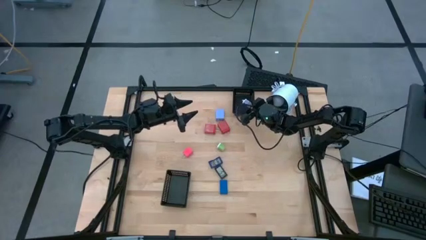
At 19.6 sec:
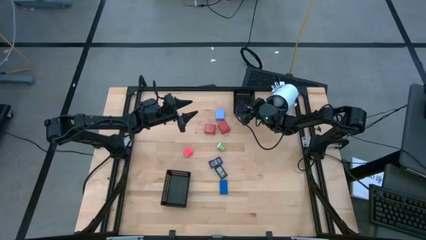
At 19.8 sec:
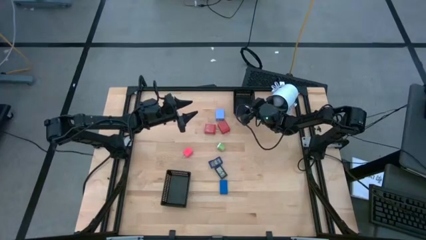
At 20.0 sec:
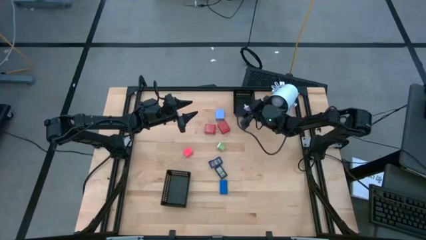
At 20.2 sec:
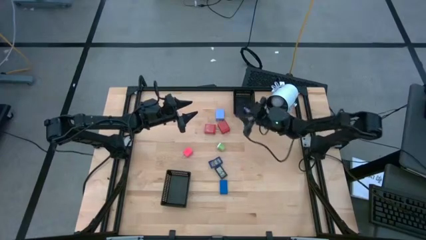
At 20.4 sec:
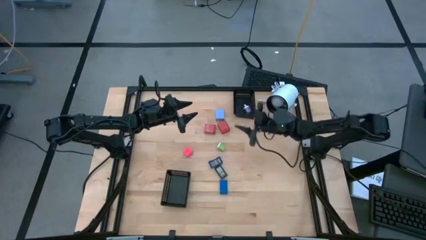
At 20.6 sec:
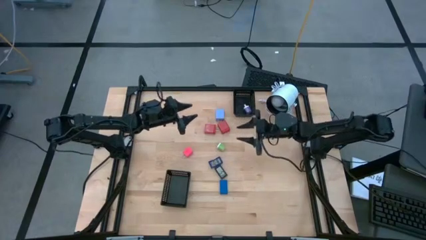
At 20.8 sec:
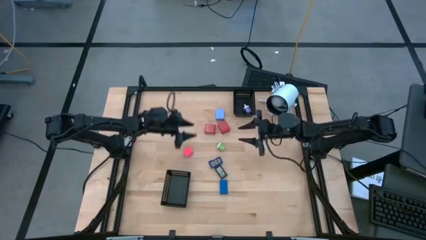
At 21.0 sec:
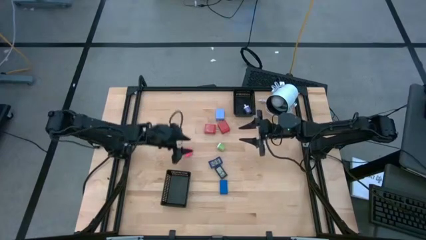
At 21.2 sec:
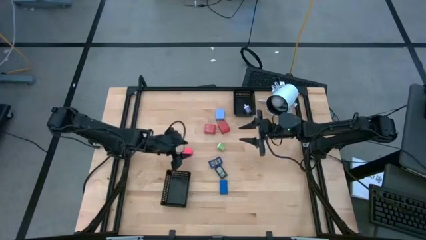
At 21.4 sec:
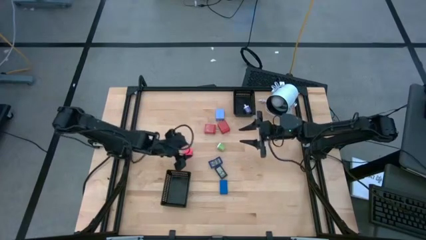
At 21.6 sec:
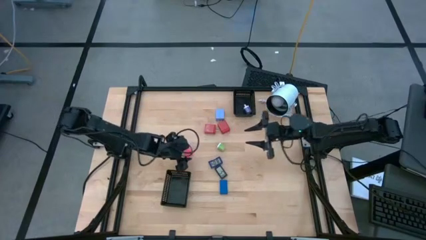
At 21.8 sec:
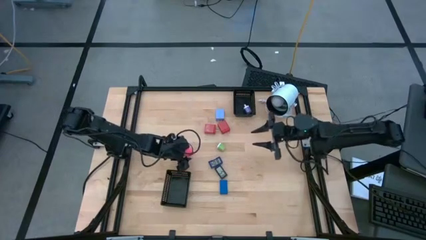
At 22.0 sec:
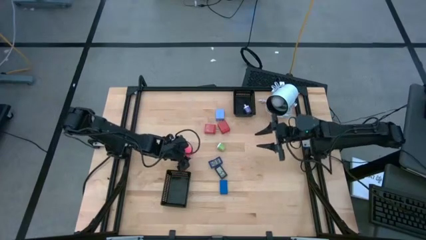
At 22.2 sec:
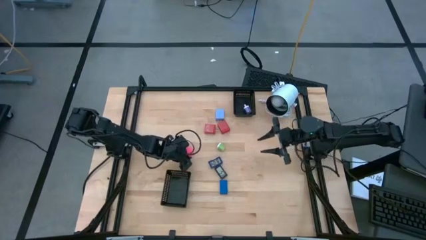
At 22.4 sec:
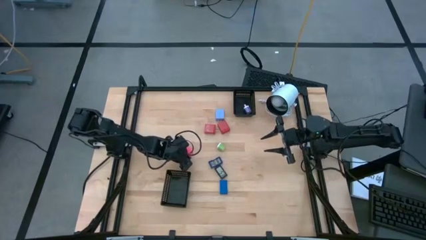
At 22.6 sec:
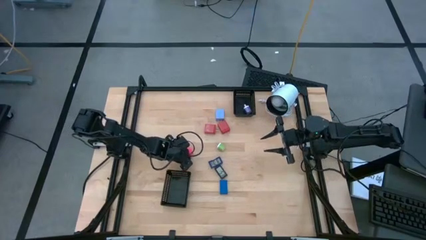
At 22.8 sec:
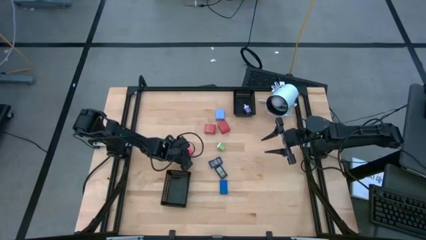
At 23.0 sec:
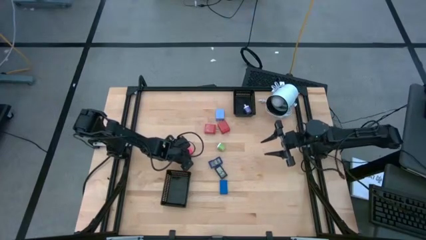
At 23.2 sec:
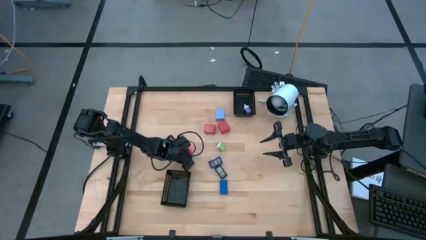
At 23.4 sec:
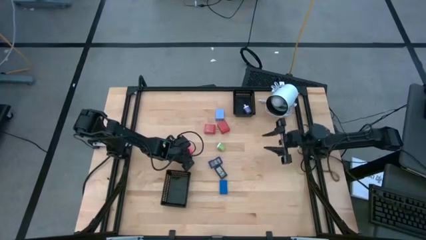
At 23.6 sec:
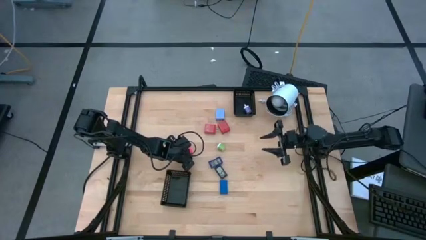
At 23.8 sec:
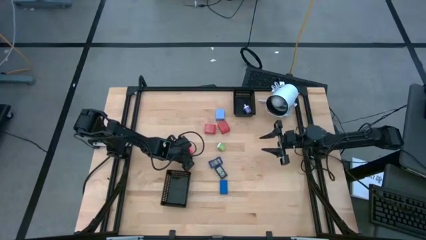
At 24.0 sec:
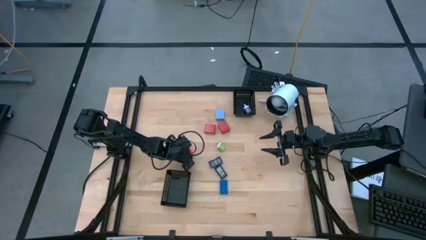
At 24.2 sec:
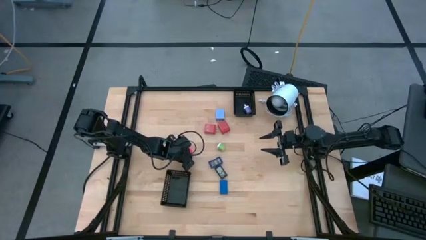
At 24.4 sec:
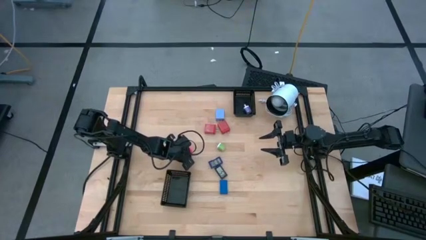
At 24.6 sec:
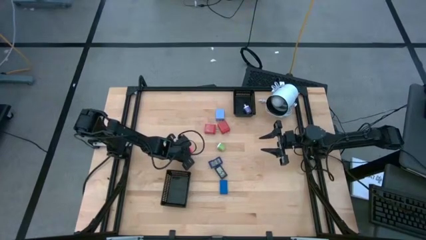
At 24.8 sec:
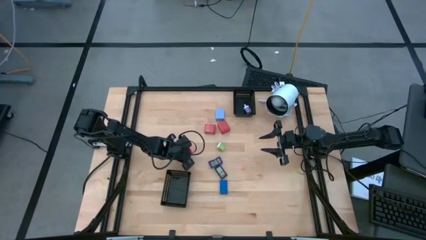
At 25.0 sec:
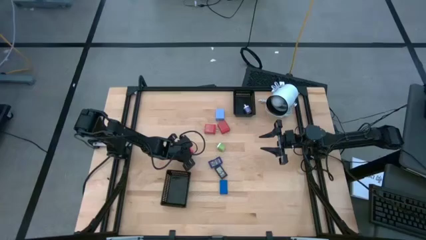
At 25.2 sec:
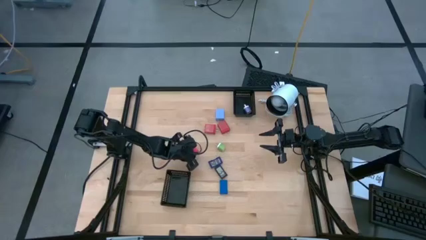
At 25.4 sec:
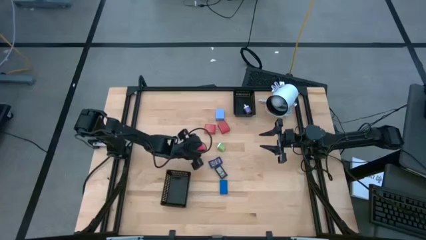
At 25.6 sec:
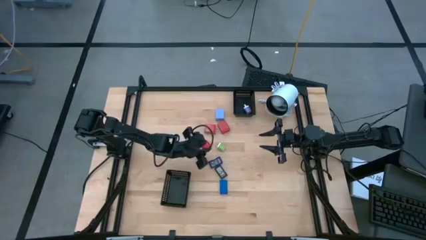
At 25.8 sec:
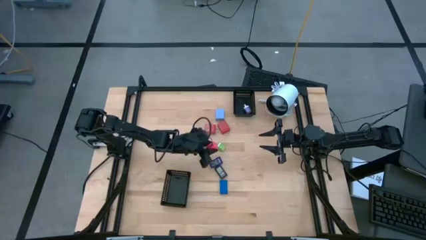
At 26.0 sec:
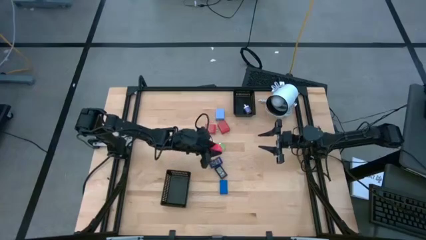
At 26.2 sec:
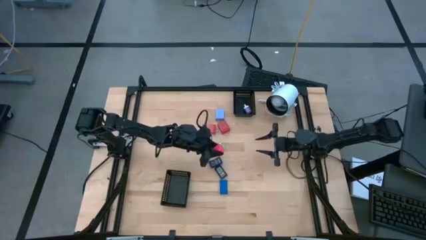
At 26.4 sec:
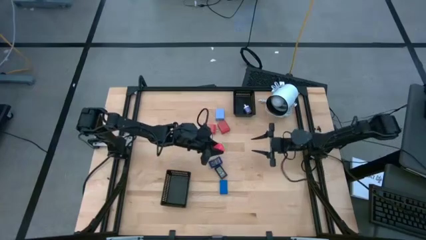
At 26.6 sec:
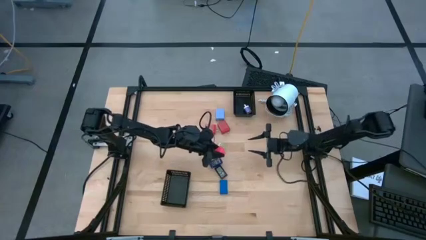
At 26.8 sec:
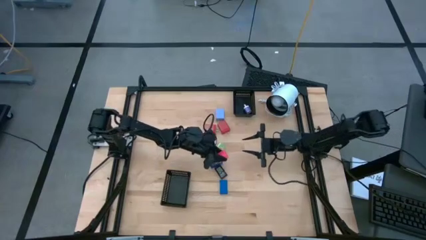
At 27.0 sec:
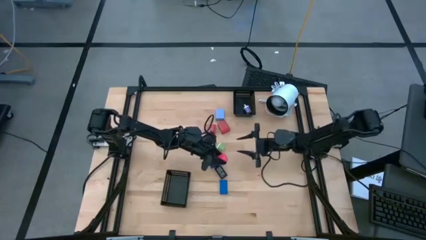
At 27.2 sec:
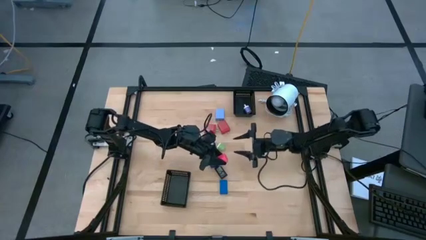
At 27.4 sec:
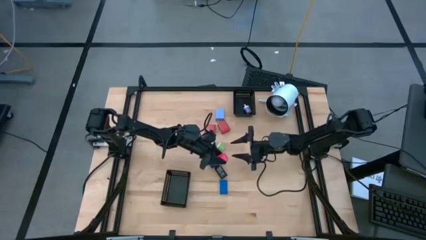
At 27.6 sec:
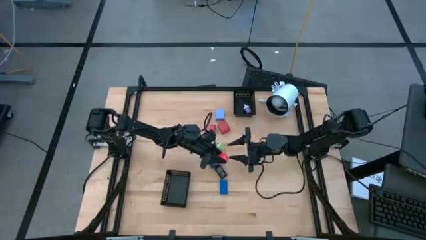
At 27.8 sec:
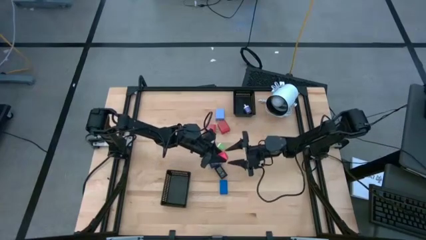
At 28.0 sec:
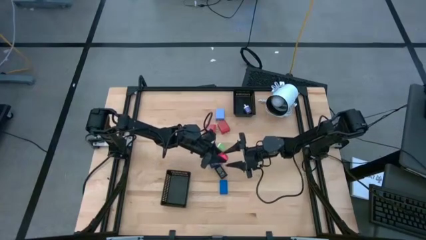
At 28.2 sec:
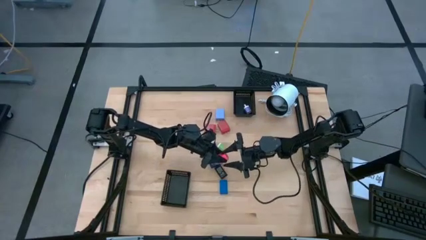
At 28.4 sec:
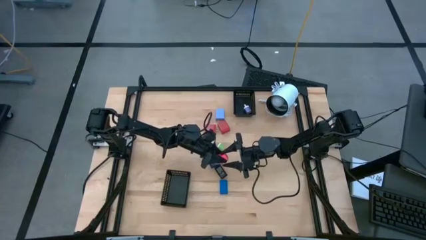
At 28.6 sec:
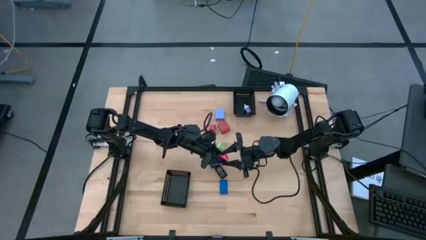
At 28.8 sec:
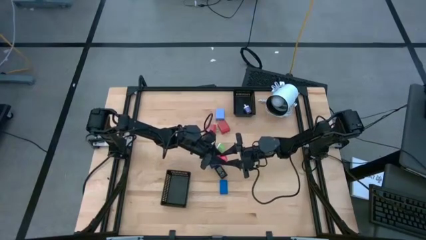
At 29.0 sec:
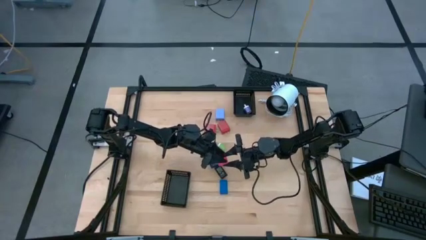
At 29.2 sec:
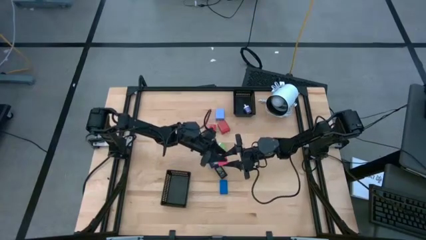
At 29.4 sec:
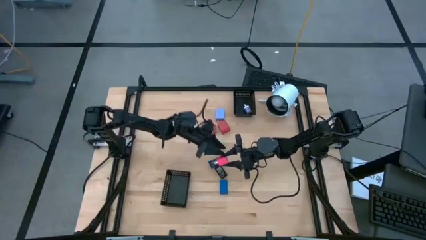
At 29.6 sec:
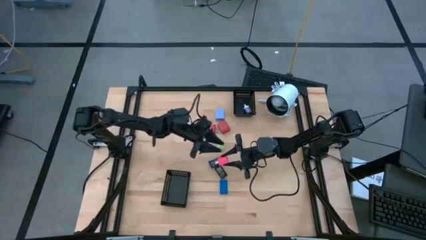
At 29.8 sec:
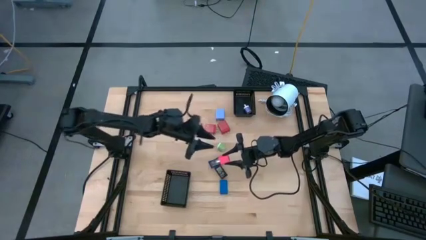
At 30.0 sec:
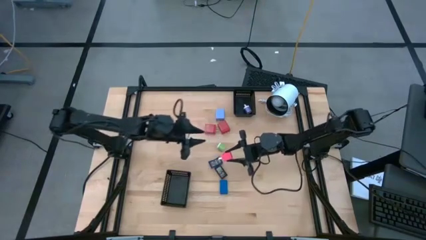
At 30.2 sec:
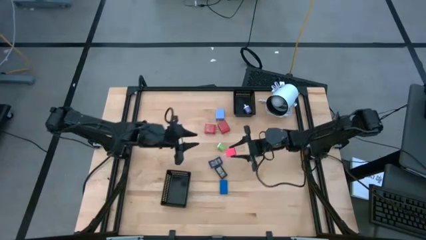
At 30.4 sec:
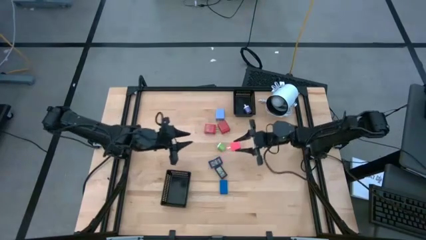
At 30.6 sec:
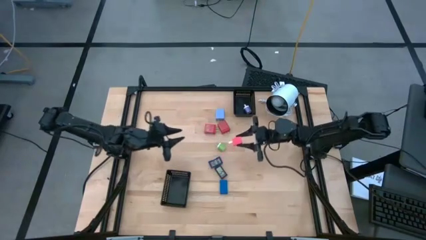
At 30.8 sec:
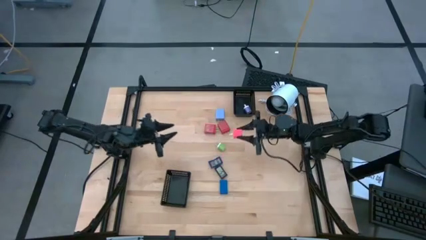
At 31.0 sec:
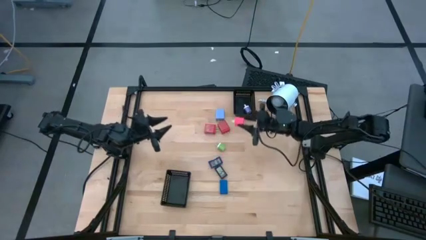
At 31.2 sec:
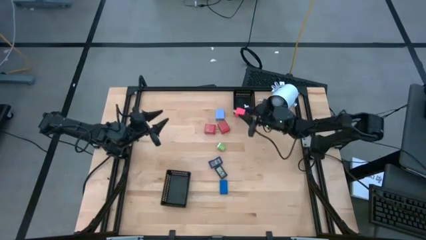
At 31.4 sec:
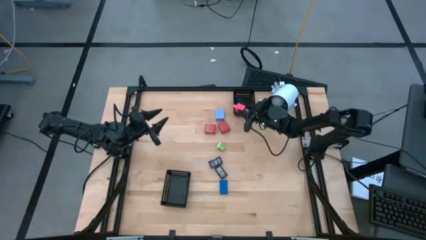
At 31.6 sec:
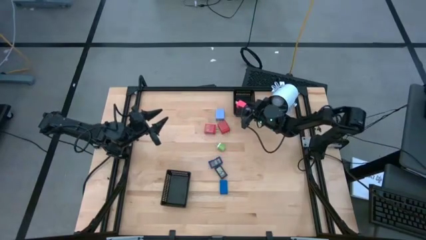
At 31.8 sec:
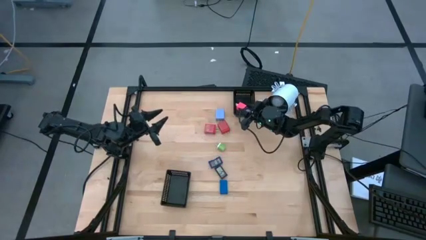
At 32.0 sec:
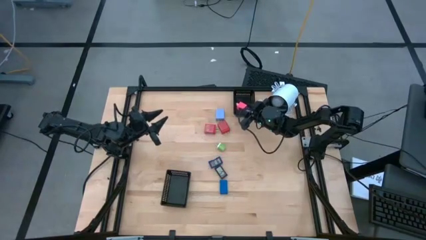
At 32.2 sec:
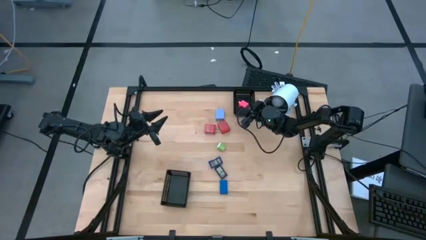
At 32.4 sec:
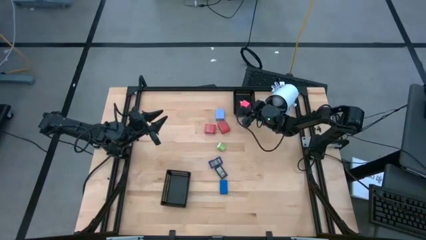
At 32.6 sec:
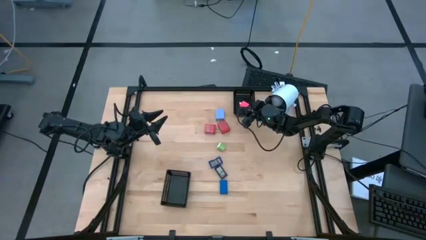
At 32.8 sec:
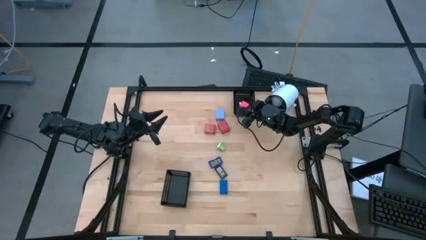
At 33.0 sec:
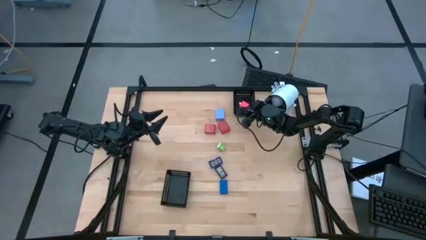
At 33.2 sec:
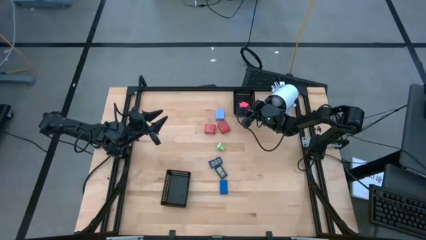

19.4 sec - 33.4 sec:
Task: Pick & Place Office items
Put the pink charger adapter into the top black basket

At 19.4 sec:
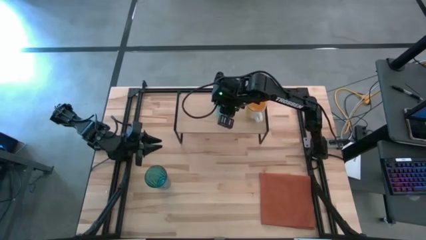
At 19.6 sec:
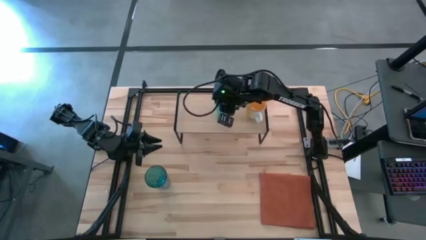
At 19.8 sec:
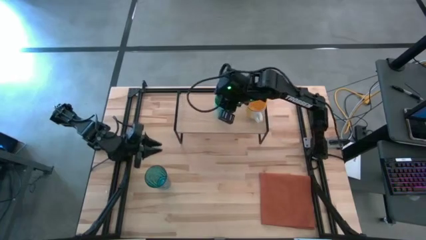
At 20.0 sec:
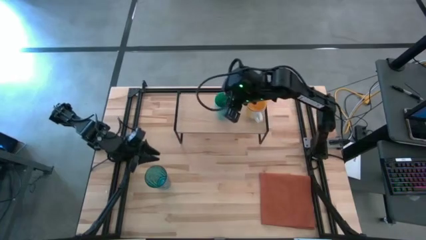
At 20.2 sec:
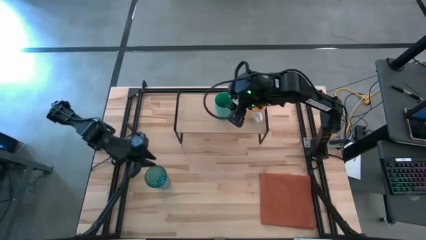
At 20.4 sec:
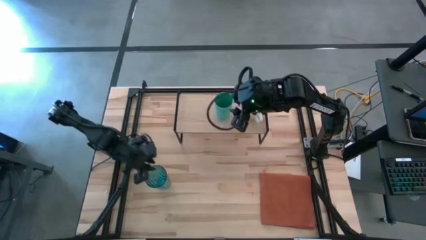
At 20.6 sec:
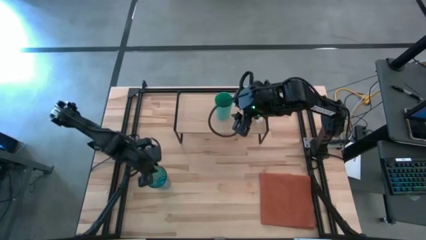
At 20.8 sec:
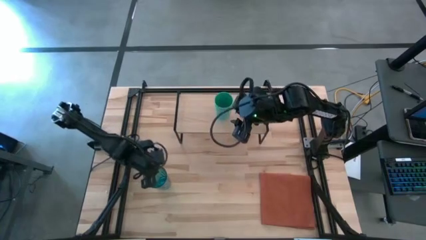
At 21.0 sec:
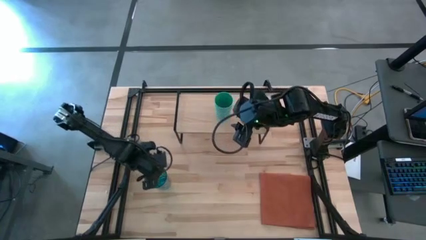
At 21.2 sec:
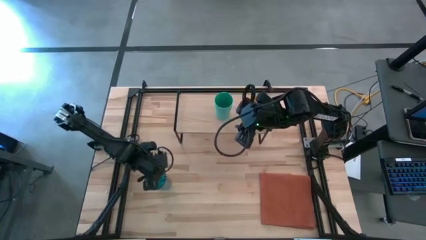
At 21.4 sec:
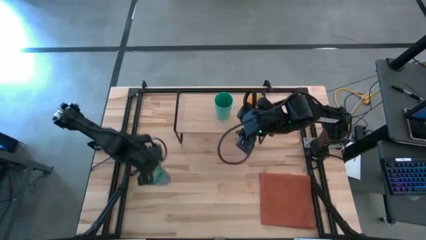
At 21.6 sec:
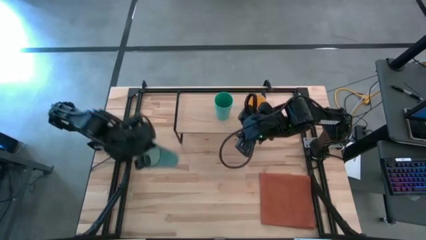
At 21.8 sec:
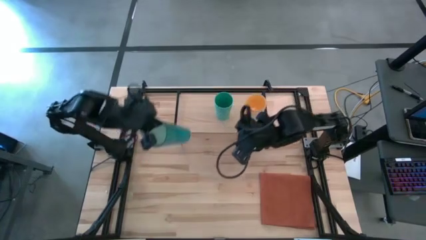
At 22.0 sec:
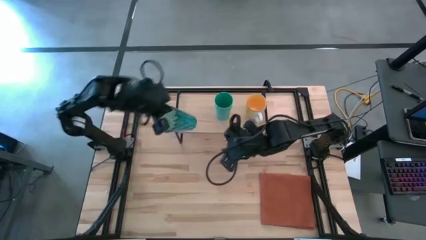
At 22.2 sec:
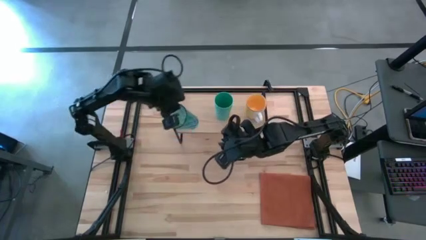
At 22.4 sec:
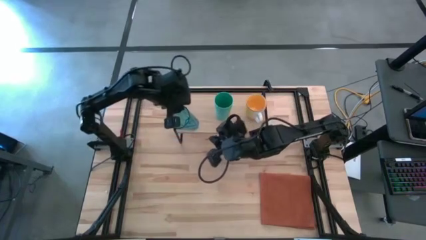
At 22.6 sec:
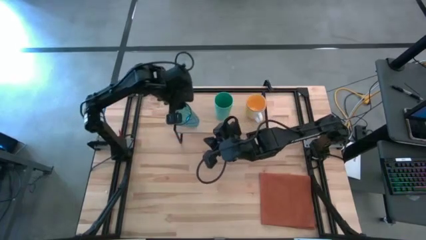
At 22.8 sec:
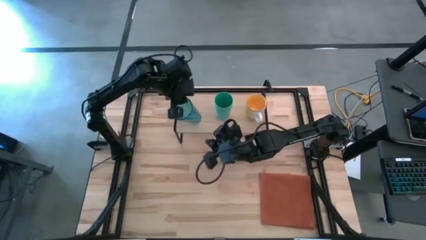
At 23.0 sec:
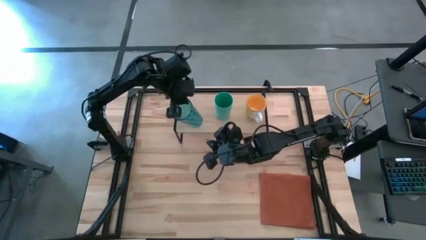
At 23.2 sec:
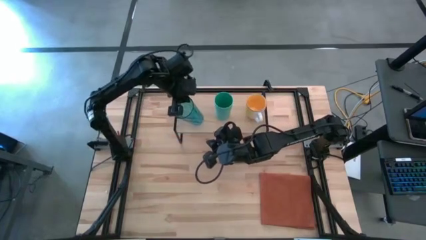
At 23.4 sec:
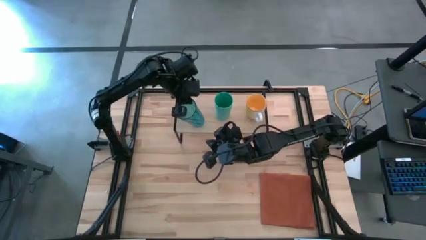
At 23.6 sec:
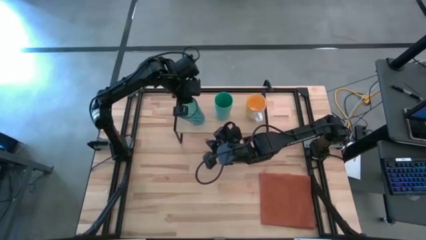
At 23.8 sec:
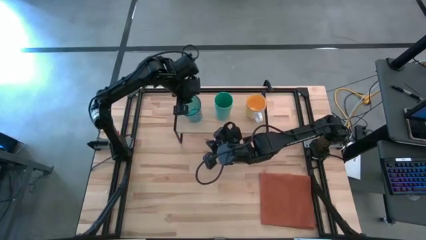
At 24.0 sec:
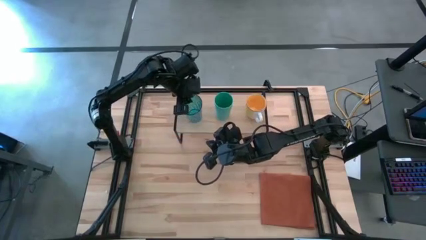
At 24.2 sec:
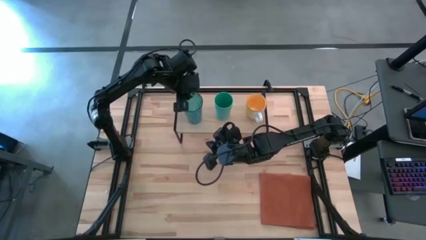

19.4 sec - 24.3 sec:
Task: Stack small to large cups/mugs on shelf
Put the transparent blue cup on the shelf
